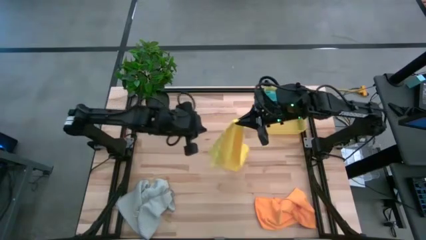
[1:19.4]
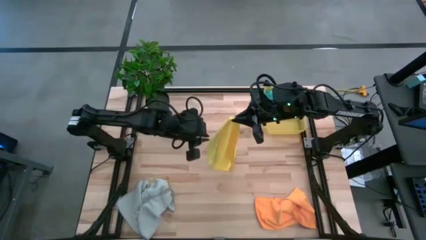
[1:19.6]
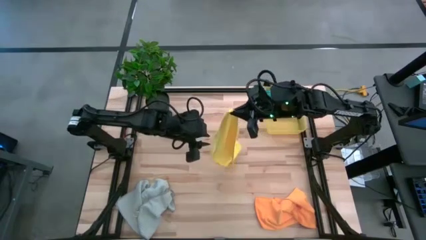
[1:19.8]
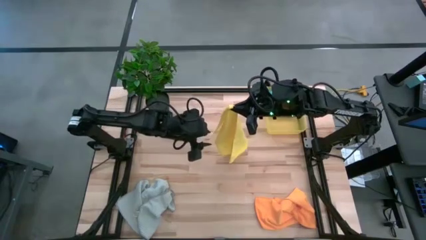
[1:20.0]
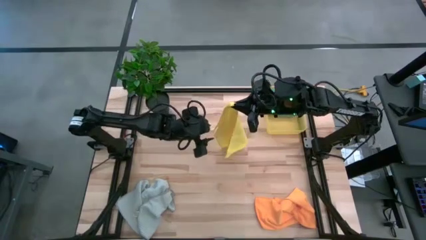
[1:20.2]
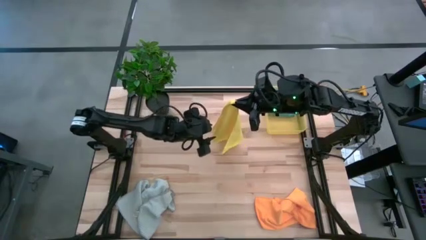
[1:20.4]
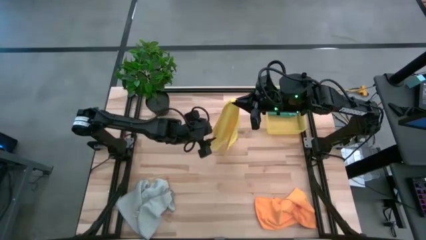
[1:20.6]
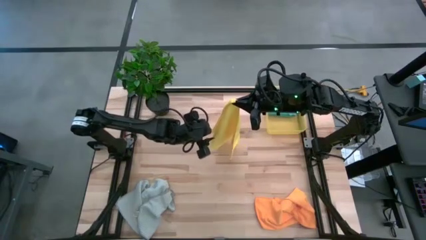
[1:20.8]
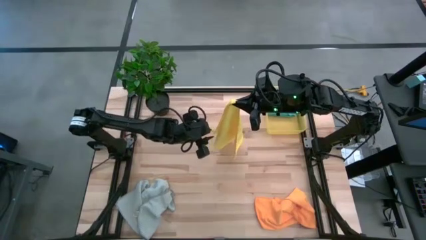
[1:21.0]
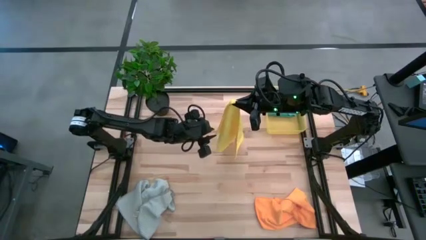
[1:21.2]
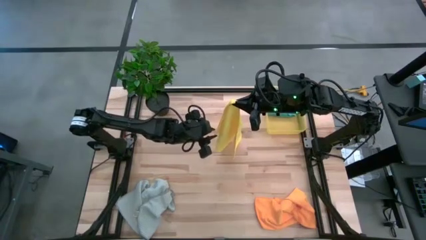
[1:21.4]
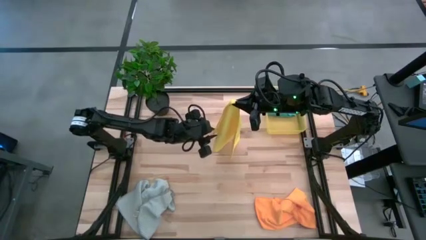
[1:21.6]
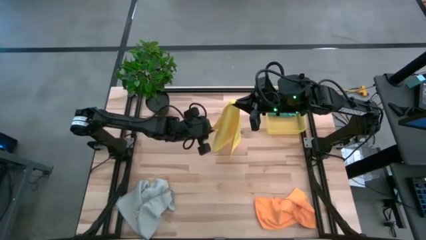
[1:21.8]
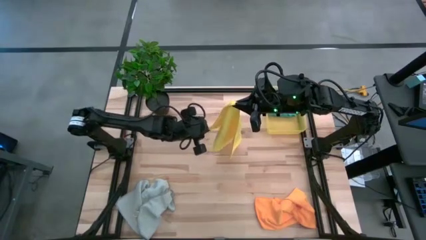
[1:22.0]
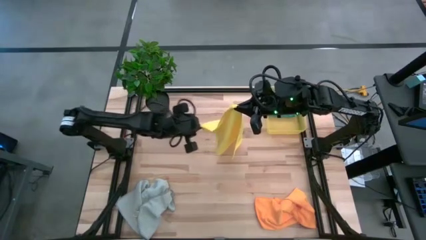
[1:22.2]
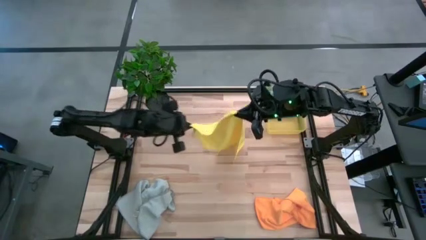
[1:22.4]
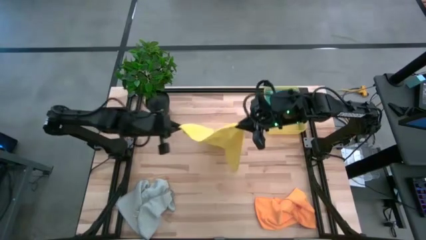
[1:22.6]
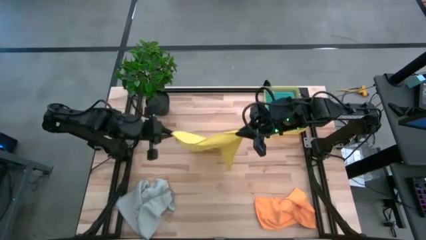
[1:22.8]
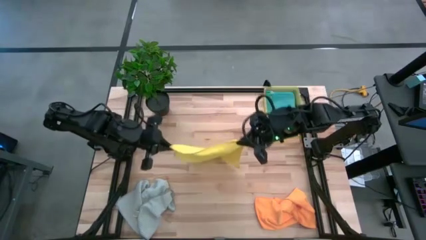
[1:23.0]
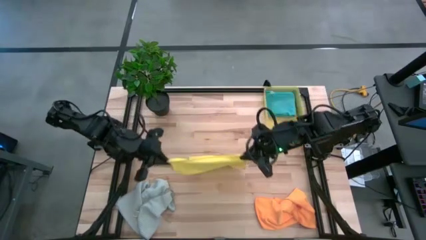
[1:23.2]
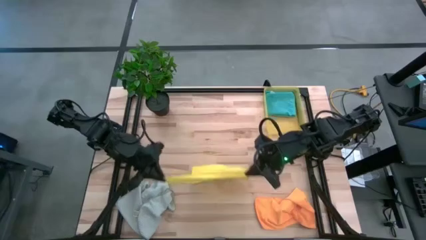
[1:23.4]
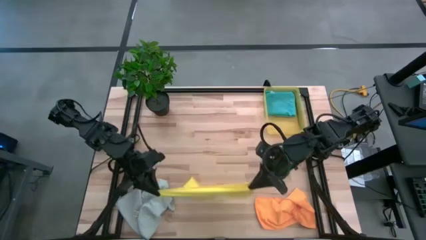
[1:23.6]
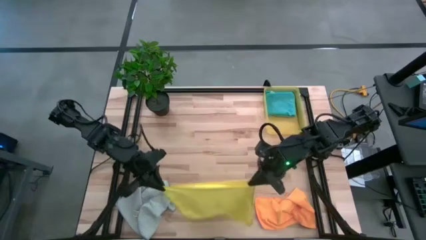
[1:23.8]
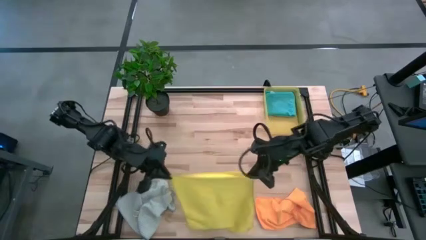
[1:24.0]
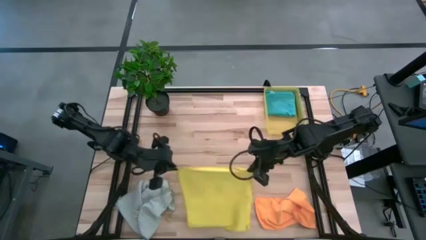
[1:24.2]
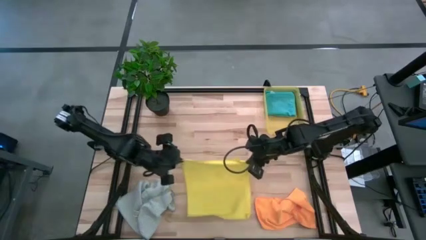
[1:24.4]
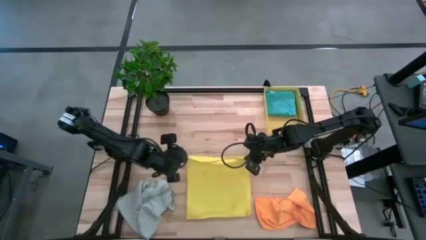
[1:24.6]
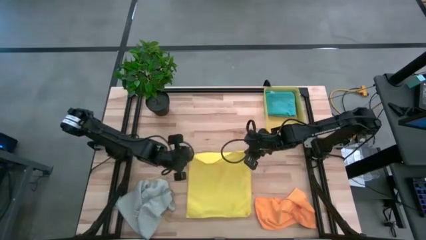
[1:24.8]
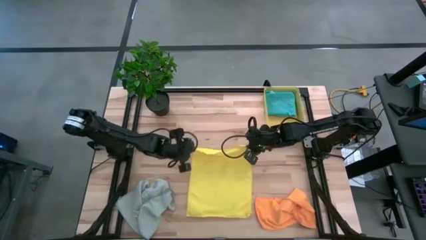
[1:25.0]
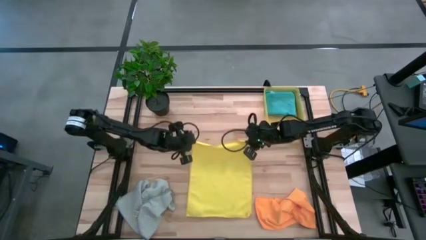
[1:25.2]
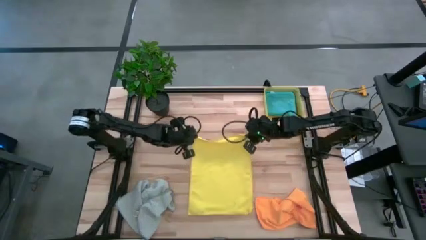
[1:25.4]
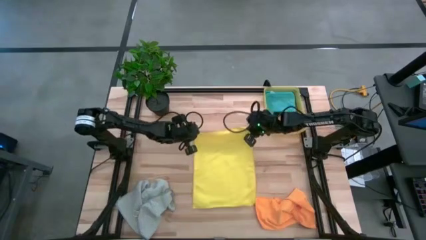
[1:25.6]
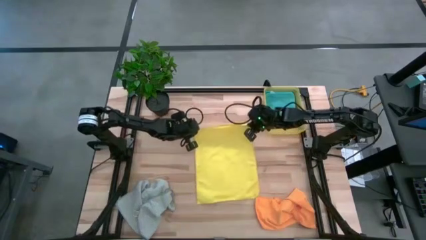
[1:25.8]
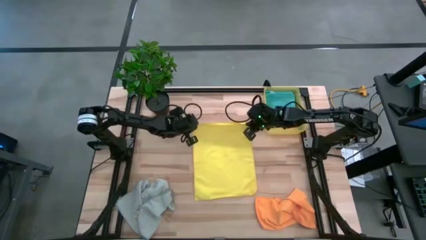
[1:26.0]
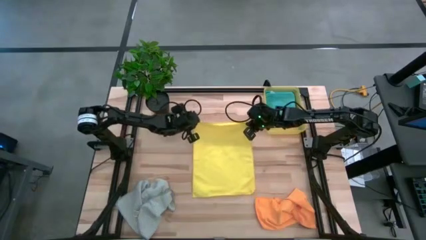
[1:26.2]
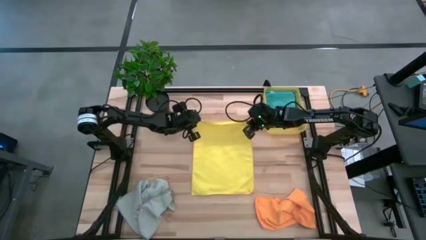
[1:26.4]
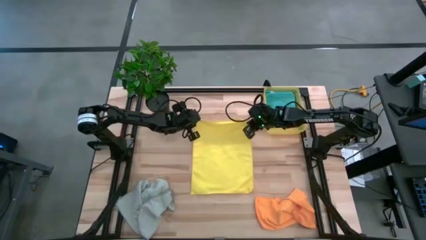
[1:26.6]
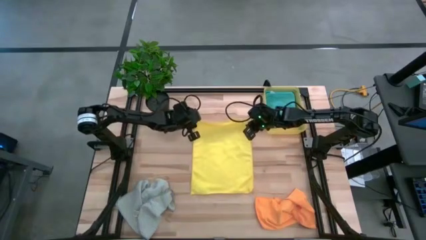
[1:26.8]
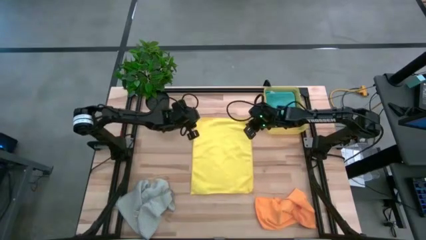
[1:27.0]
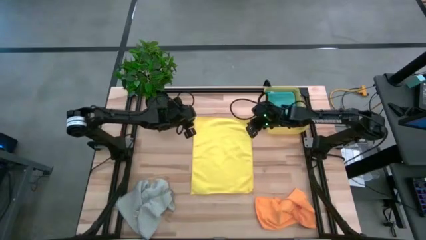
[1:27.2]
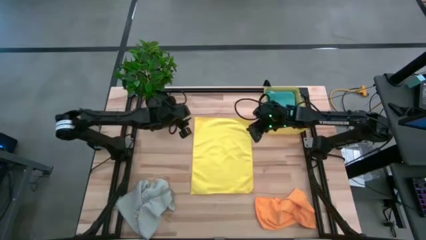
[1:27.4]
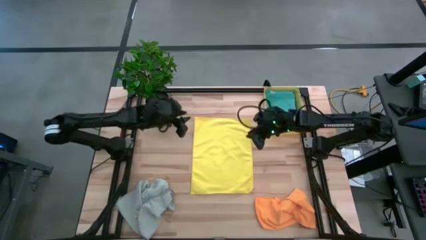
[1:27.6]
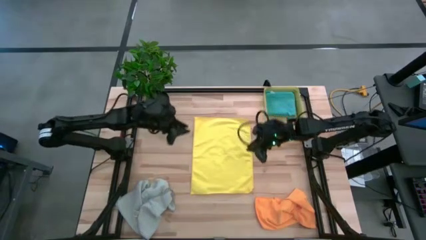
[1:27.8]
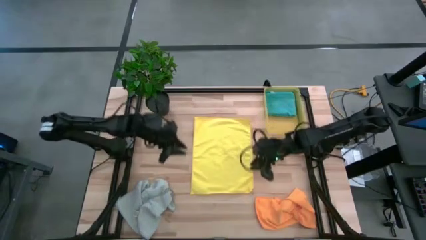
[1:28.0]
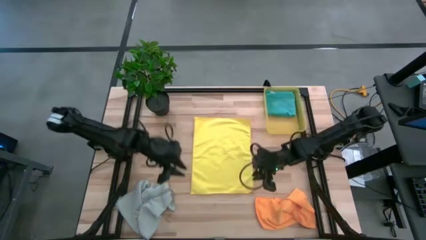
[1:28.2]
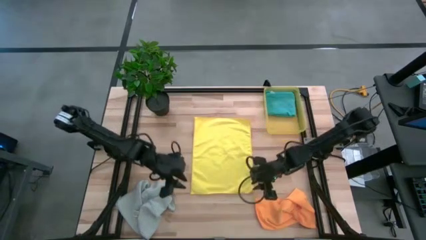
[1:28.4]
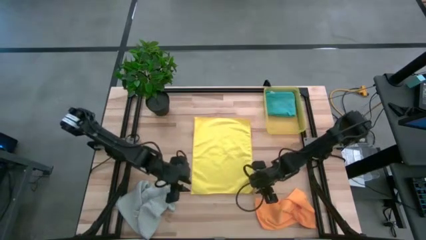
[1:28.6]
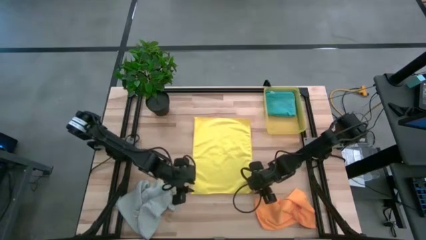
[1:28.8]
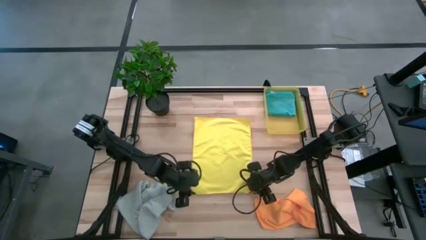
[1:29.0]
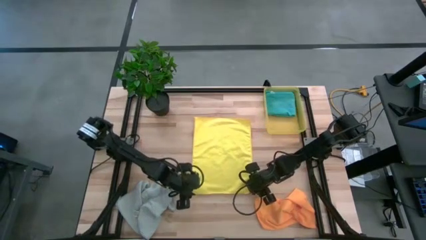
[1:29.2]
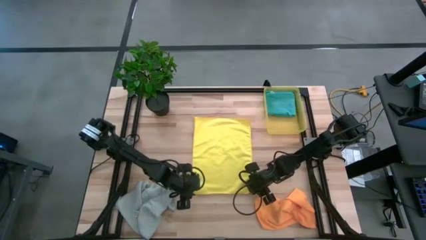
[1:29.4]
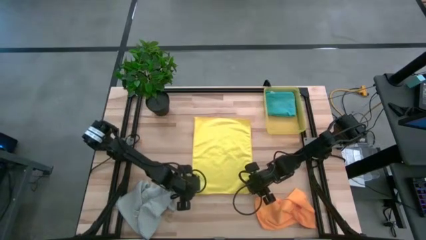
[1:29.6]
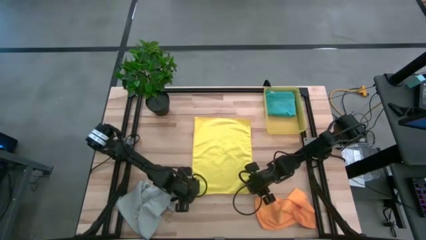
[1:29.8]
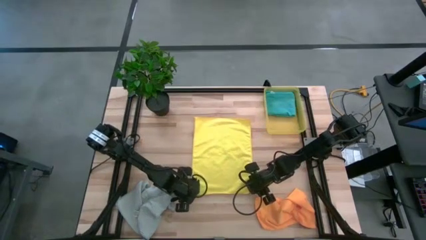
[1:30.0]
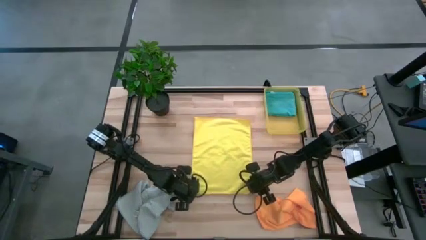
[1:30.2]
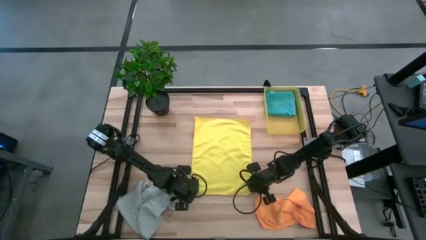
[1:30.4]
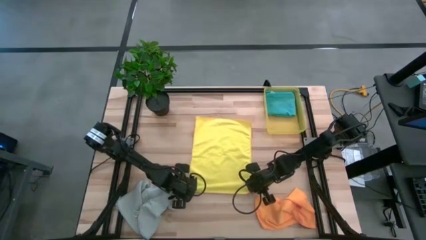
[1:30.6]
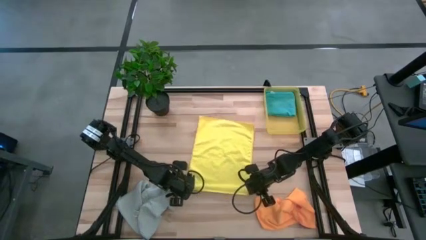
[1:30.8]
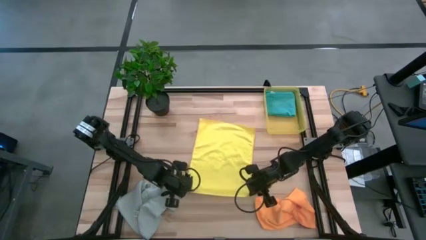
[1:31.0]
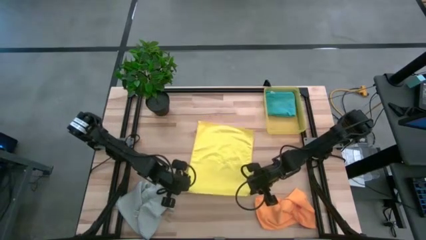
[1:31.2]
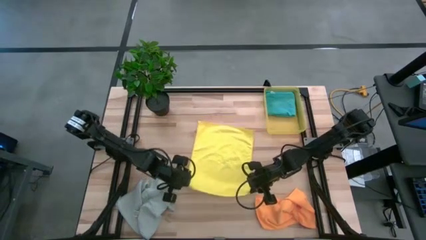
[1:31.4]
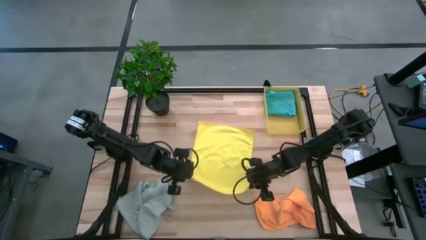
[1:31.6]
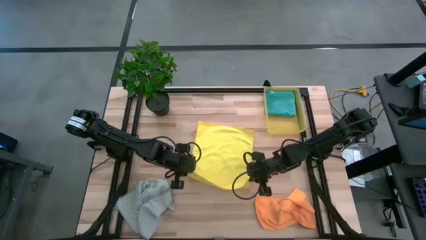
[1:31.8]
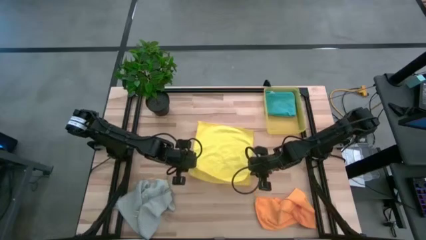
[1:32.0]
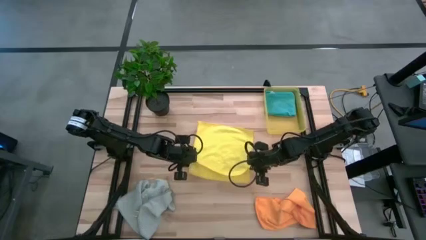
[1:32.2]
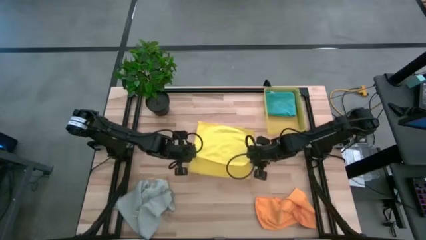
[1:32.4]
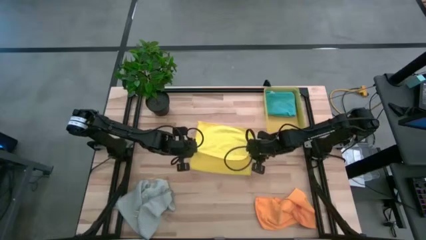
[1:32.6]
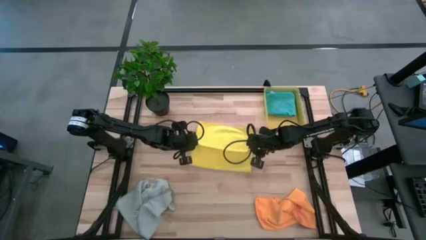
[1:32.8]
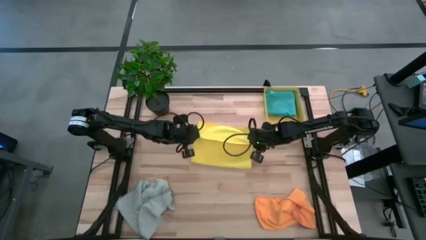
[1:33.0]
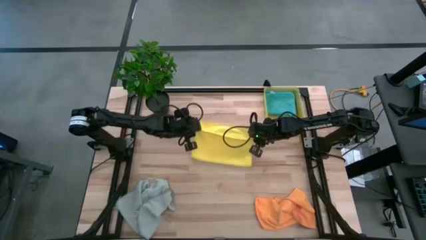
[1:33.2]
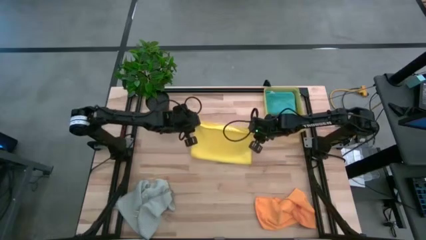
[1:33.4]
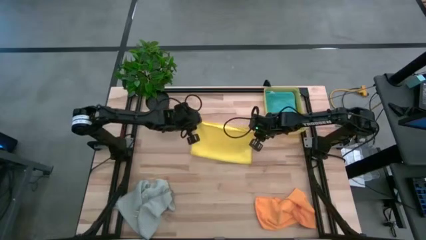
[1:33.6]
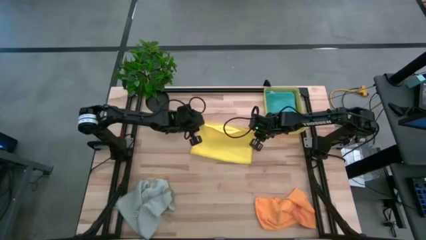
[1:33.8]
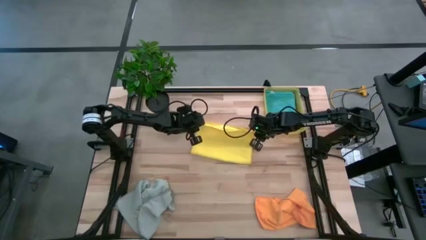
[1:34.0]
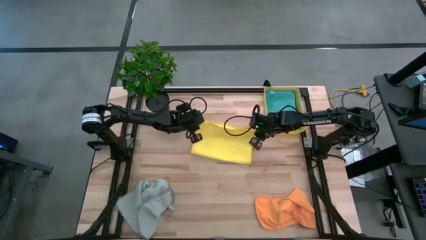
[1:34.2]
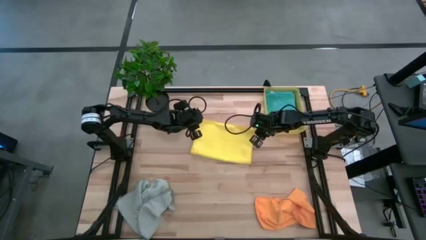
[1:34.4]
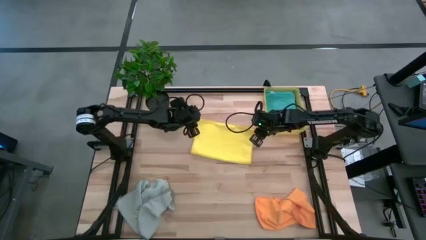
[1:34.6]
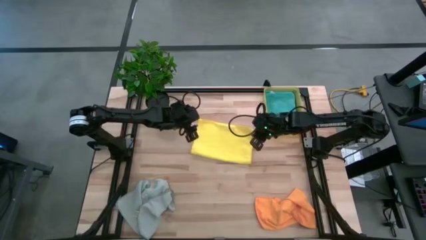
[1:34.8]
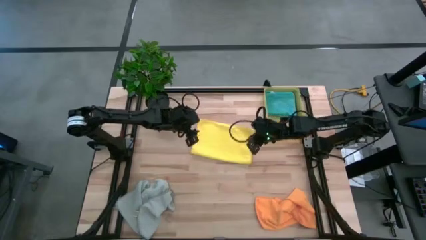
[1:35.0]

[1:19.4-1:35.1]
Task: Fold microfiber towels
Fold the yellow microfiber towel
